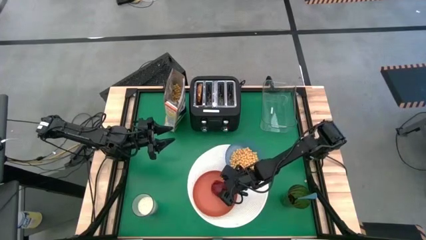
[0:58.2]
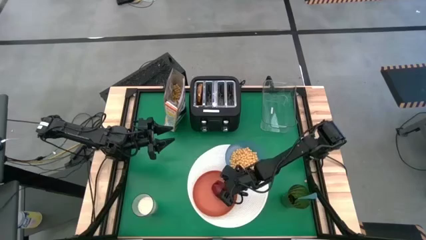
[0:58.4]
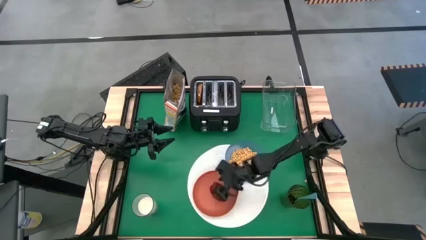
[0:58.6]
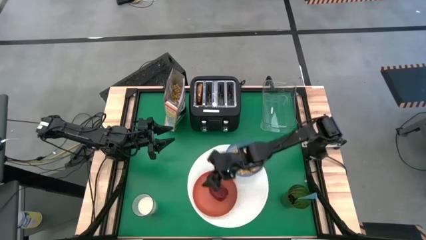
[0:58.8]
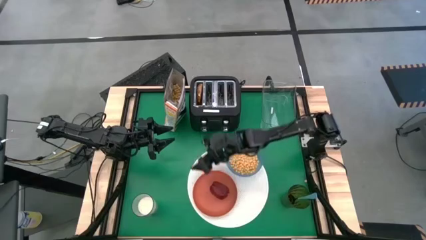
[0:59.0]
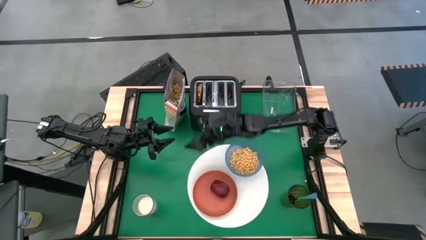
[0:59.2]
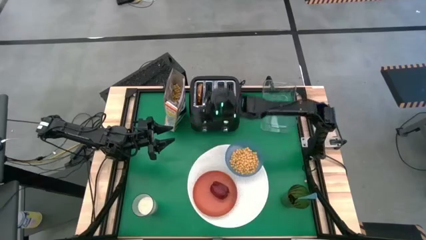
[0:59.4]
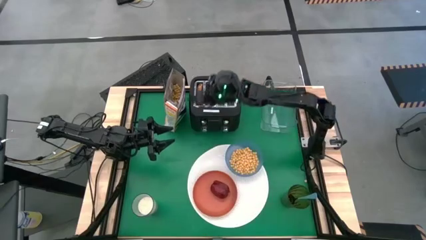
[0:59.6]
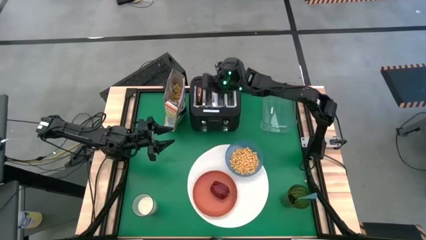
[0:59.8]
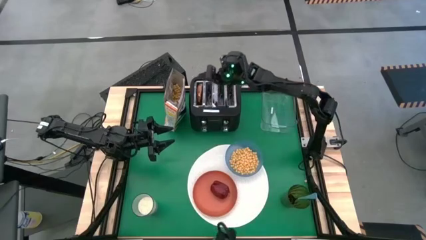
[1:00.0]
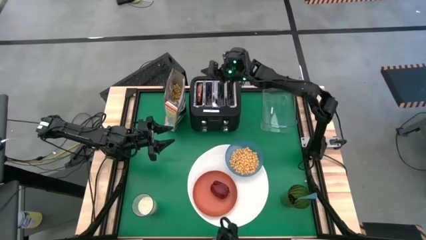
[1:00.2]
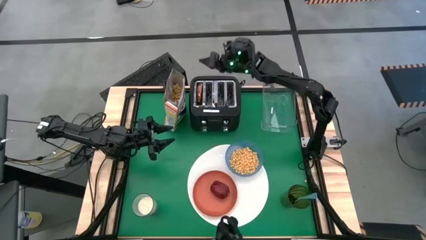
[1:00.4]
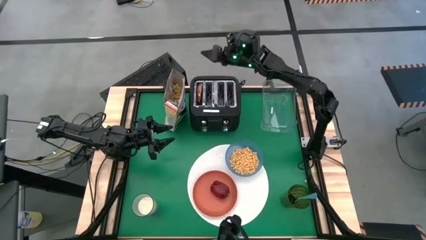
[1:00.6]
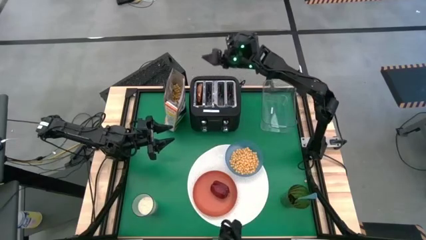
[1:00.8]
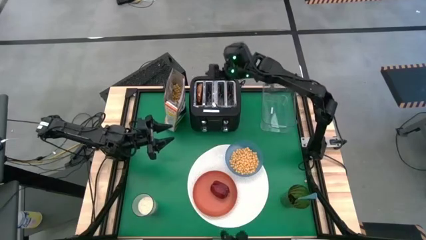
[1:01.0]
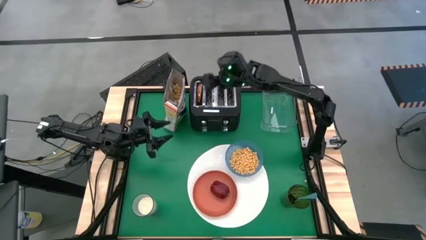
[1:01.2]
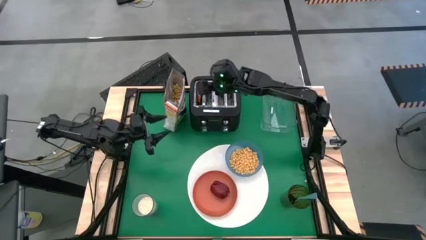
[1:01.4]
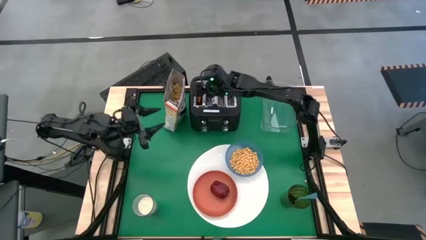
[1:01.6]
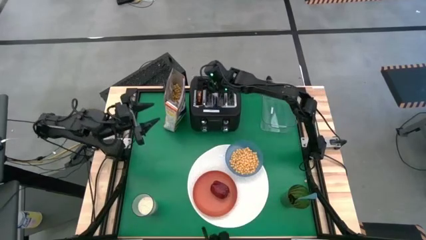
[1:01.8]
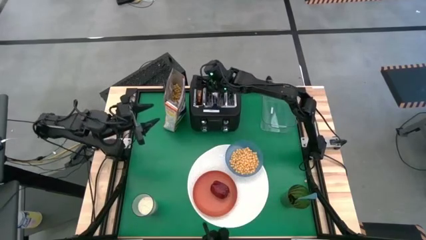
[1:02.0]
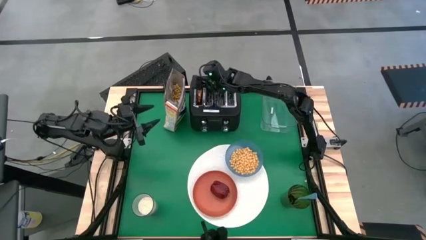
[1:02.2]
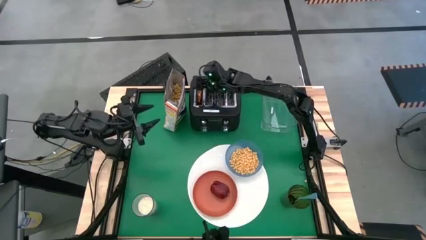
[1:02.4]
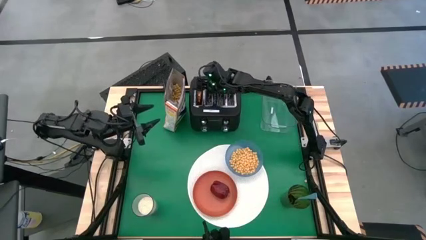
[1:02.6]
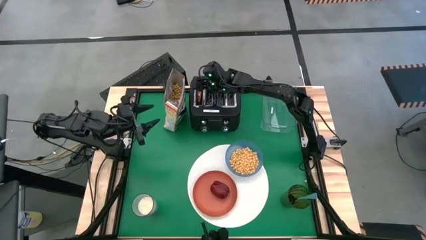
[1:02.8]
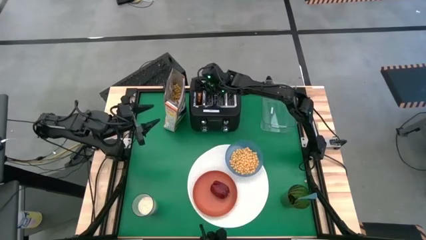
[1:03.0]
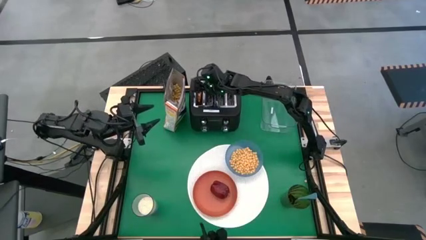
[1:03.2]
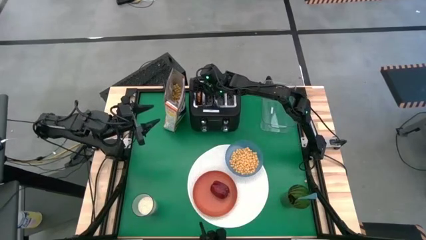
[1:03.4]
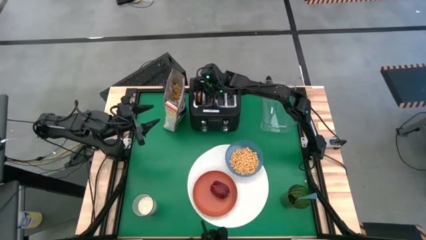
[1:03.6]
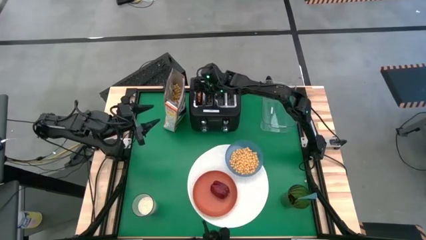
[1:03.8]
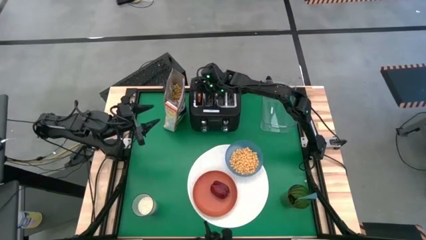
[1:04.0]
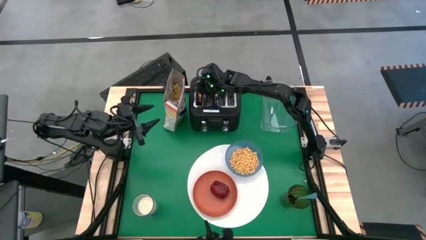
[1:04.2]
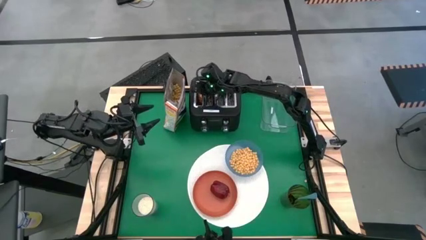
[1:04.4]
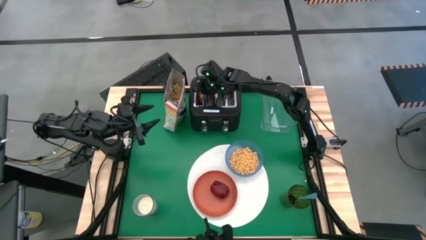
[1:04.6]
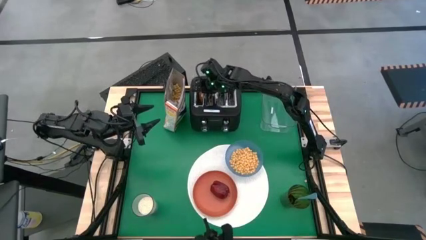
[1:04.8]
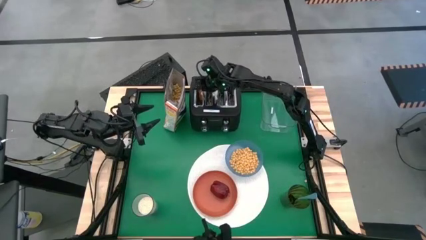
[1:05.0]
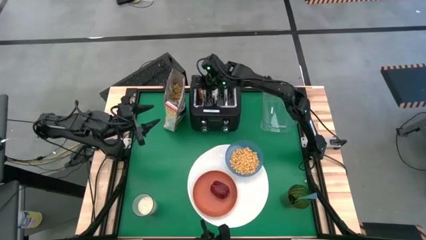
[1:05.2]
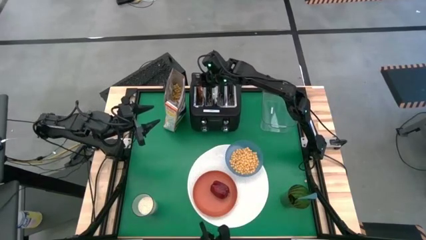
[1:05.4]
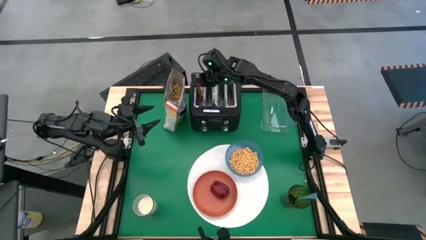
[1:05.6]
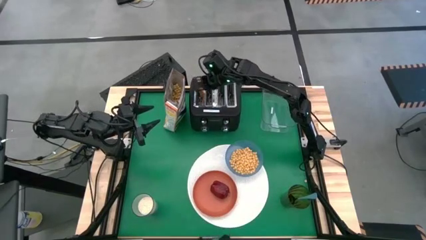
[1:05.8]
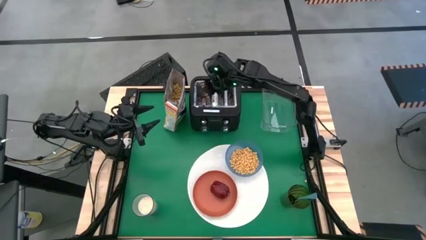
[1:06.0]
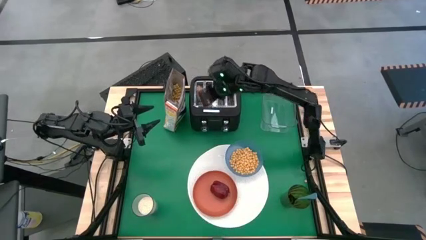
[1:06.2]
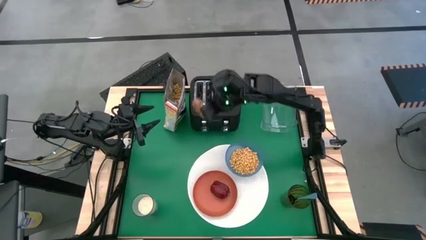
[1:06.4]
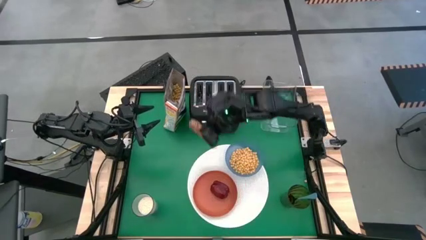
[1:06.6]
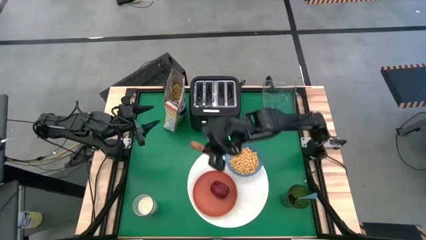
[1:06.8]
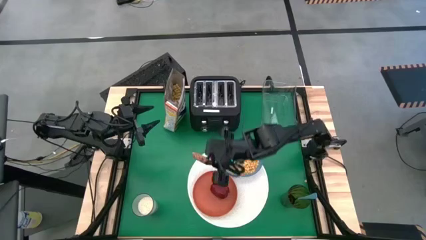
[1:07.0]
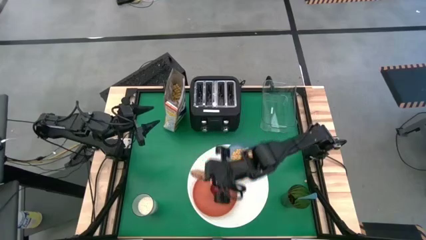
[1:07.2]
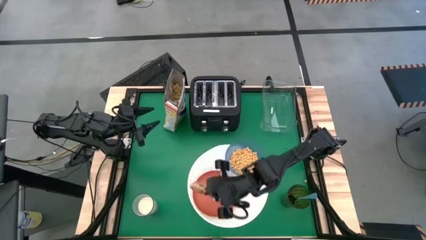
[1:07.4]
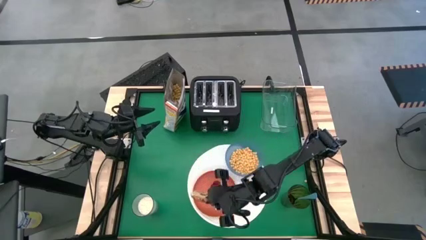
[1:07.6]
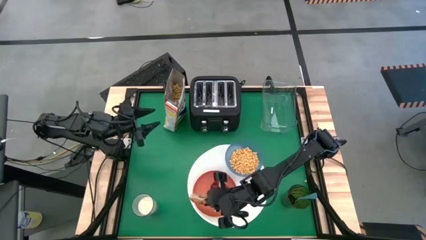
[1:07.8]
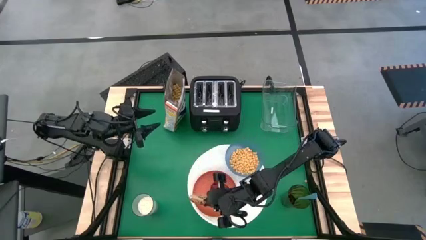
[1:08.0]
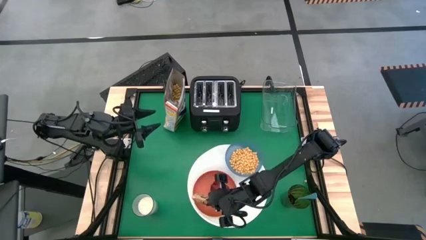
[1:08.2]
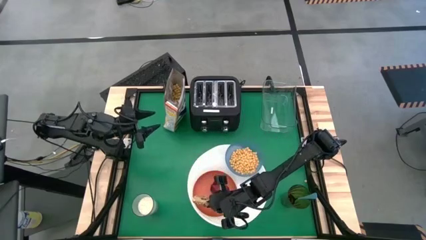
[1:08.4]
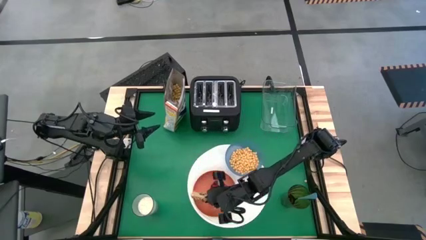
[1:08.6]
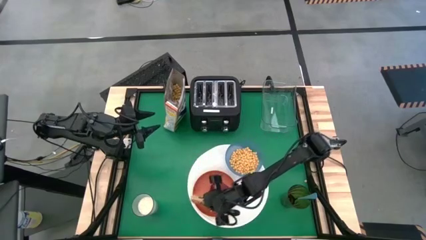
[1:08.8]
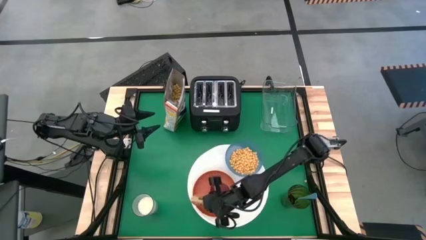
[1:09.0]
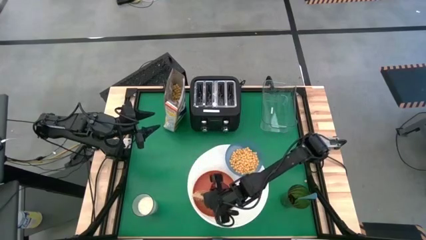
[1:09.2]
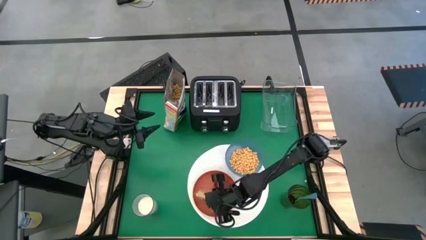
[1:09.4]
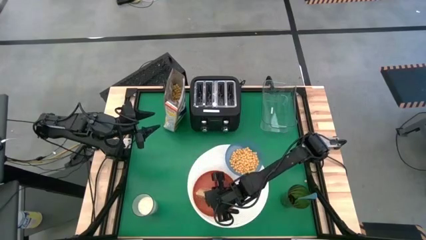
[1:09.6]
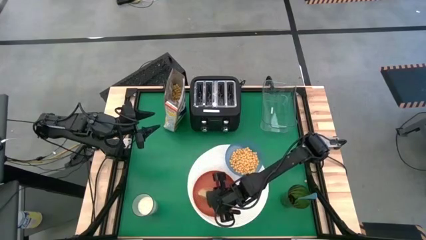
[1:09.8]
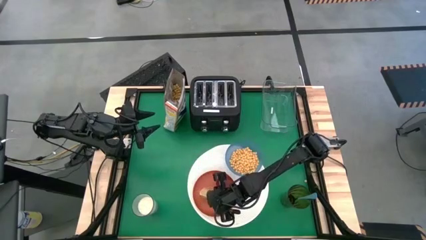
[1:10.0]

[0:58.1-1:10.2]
Task: Arrange a breakfast setting
Put the toasted bread on the orange plate
